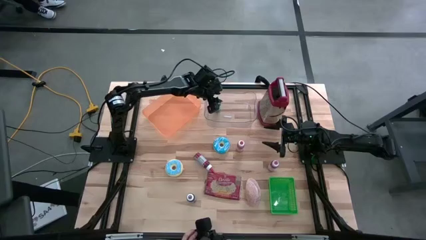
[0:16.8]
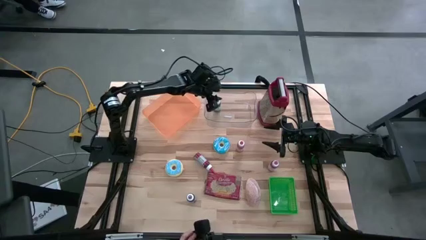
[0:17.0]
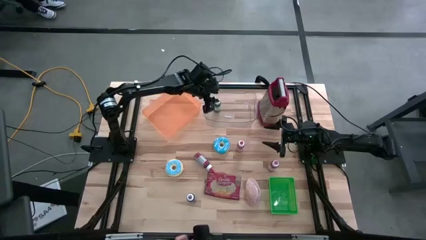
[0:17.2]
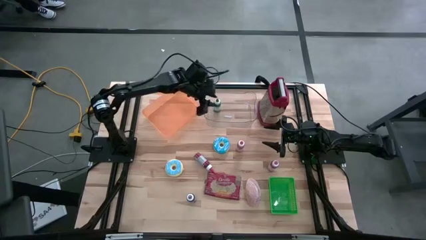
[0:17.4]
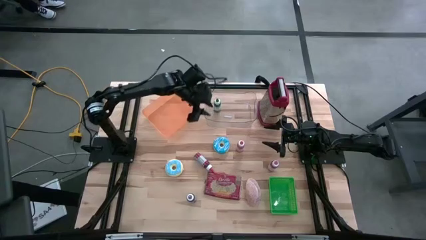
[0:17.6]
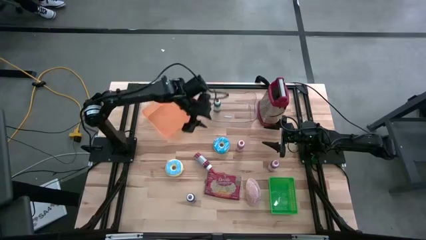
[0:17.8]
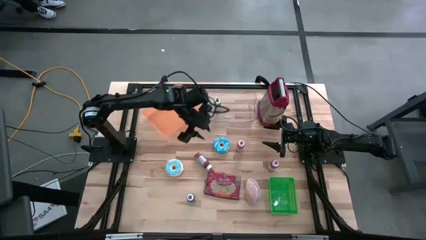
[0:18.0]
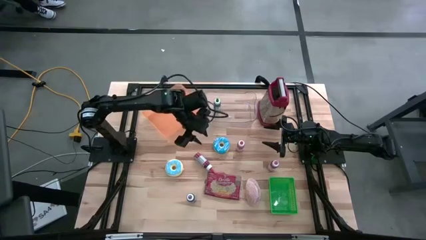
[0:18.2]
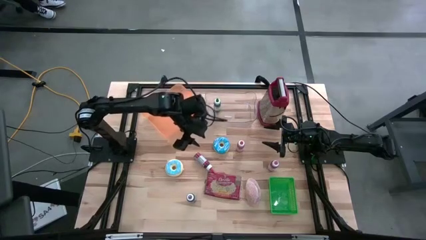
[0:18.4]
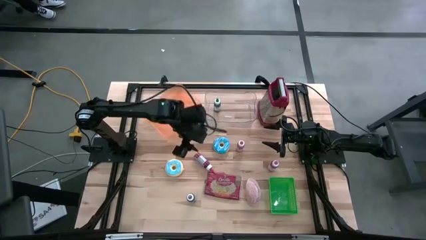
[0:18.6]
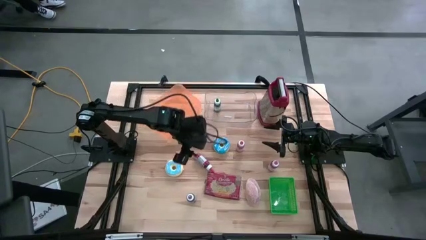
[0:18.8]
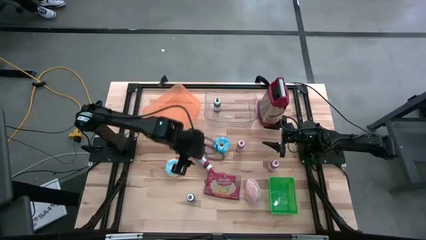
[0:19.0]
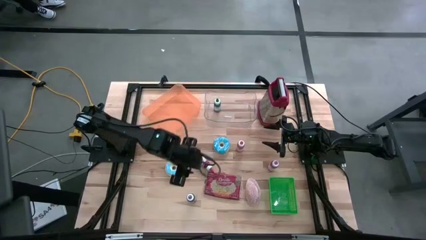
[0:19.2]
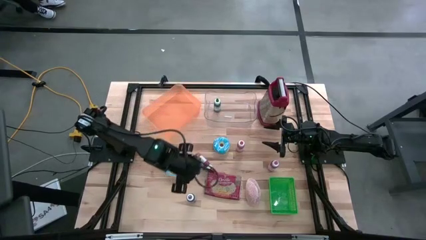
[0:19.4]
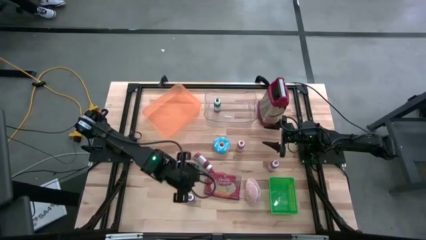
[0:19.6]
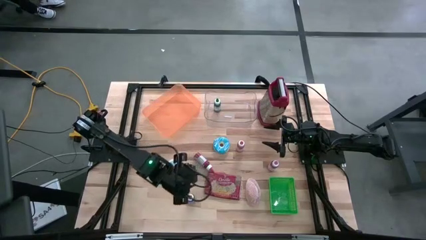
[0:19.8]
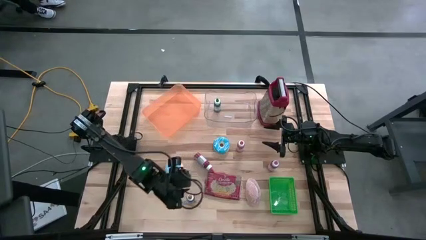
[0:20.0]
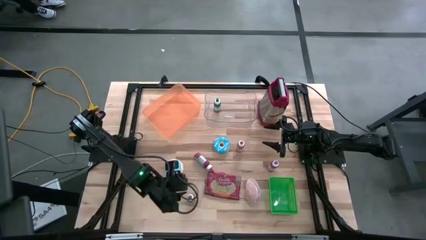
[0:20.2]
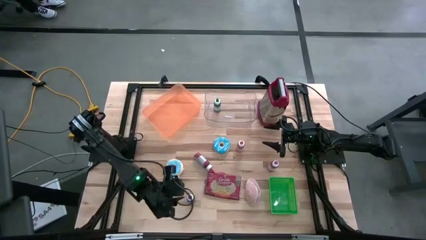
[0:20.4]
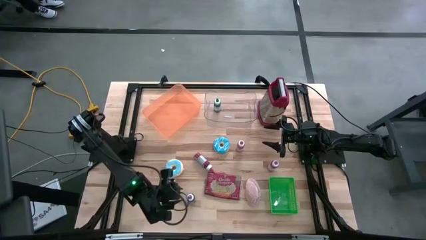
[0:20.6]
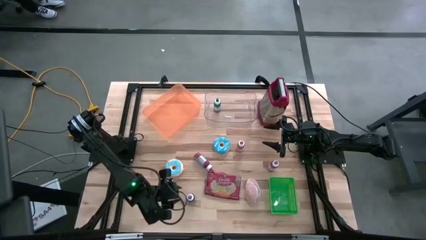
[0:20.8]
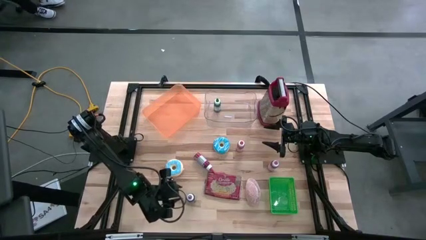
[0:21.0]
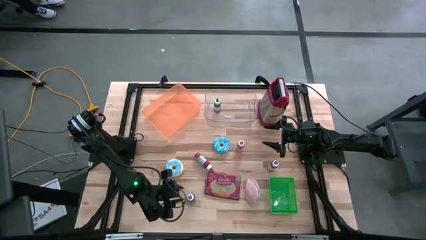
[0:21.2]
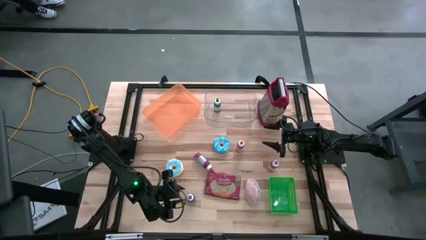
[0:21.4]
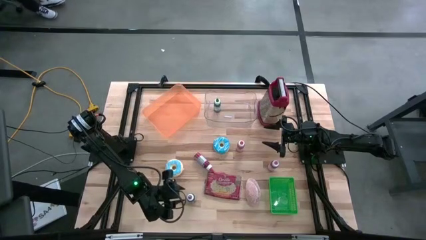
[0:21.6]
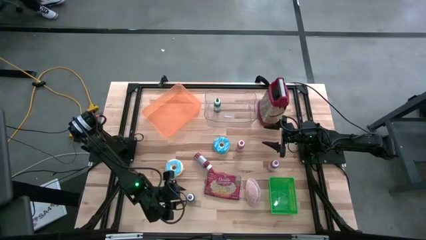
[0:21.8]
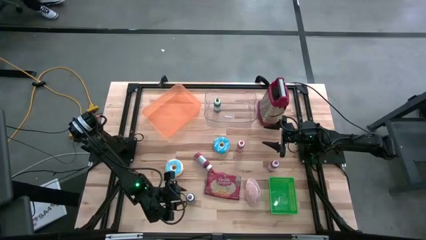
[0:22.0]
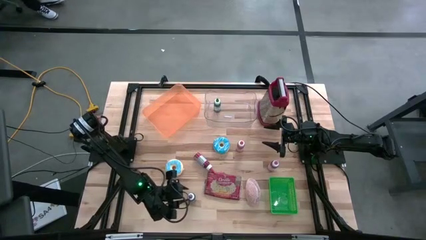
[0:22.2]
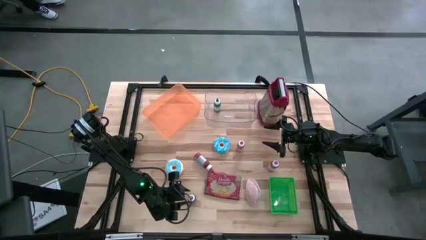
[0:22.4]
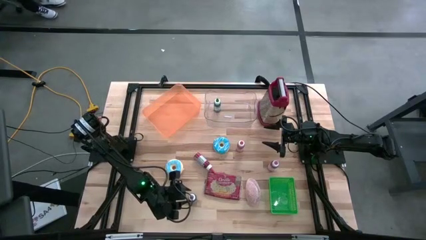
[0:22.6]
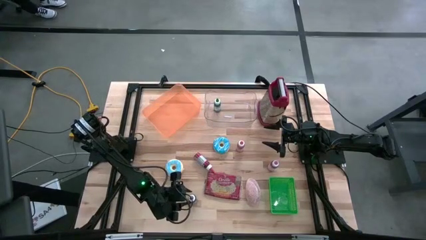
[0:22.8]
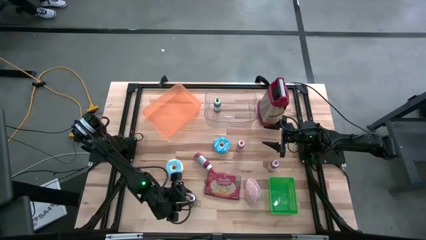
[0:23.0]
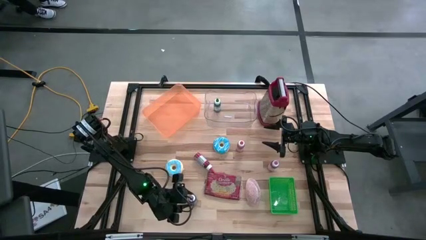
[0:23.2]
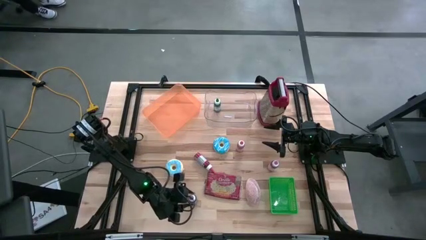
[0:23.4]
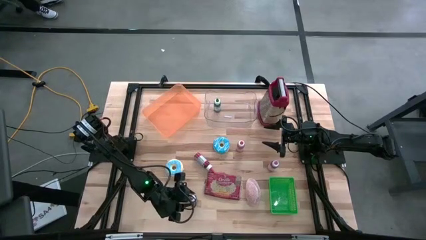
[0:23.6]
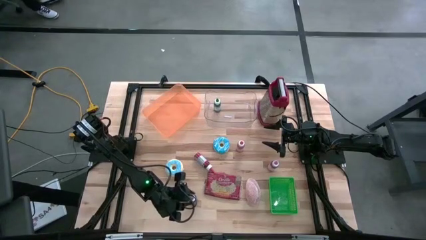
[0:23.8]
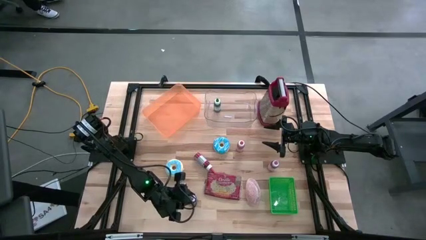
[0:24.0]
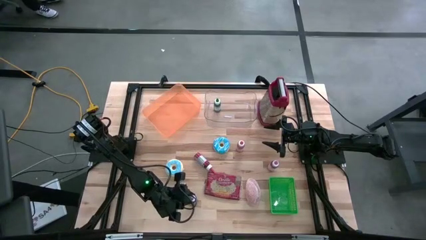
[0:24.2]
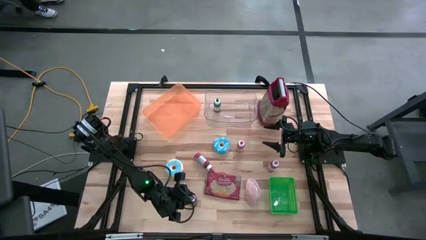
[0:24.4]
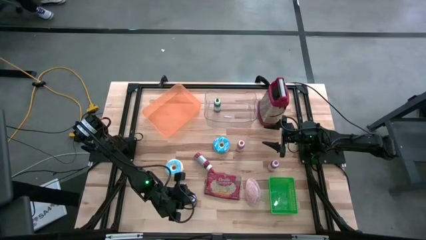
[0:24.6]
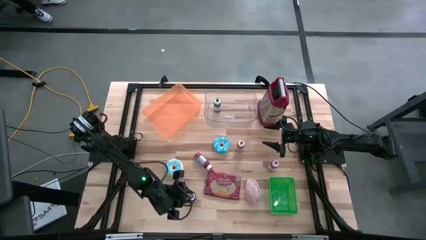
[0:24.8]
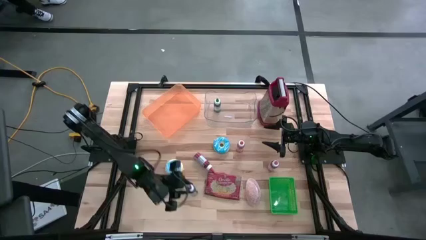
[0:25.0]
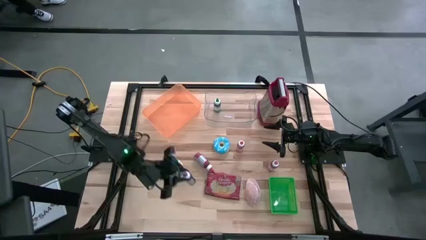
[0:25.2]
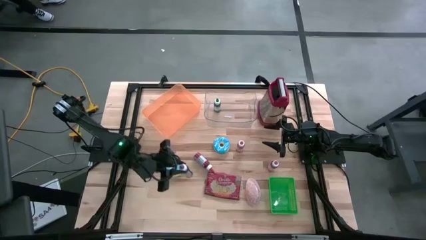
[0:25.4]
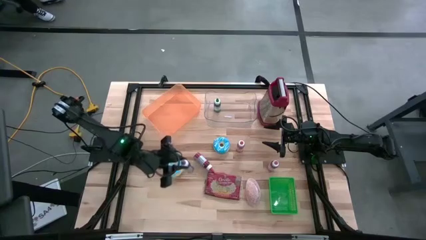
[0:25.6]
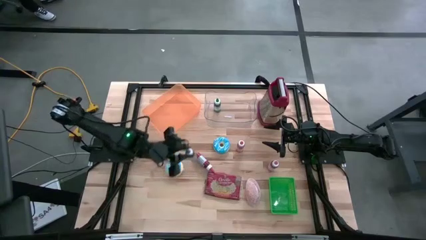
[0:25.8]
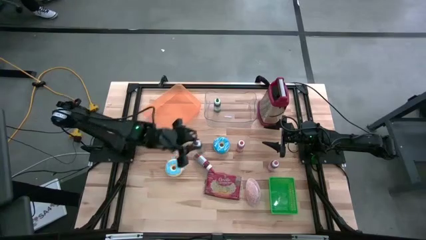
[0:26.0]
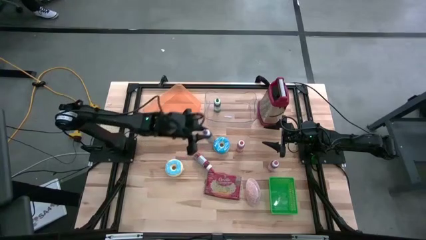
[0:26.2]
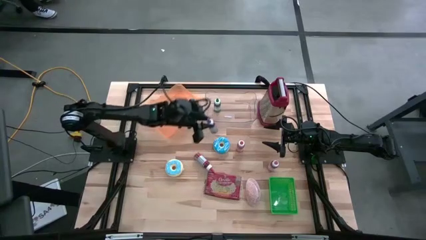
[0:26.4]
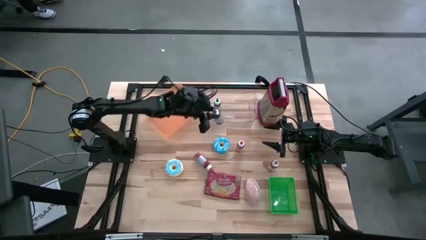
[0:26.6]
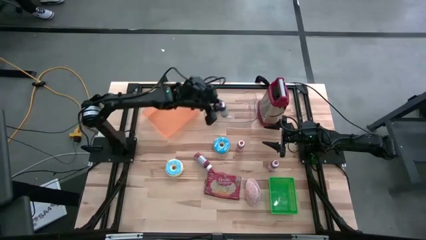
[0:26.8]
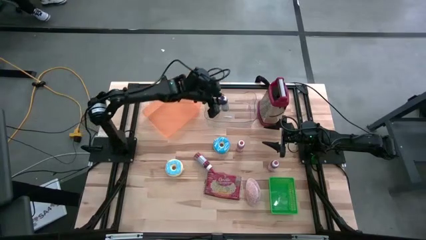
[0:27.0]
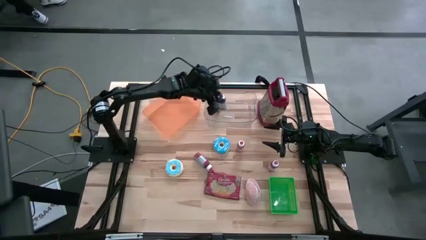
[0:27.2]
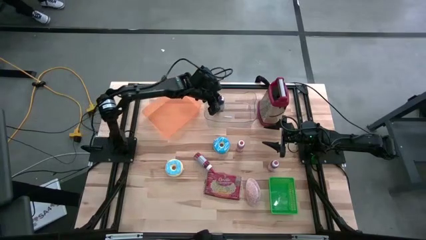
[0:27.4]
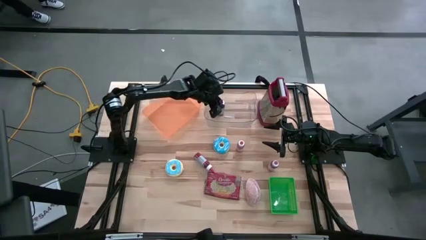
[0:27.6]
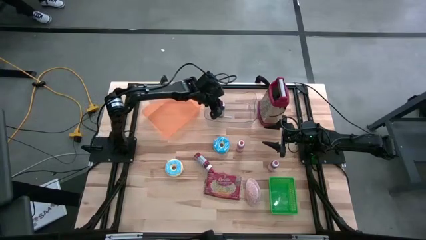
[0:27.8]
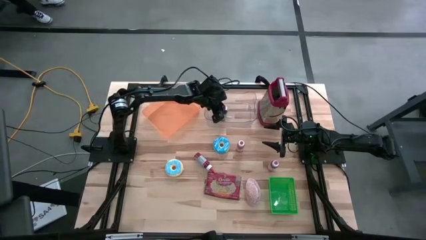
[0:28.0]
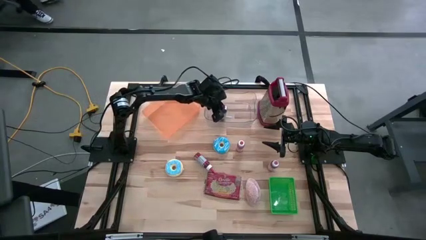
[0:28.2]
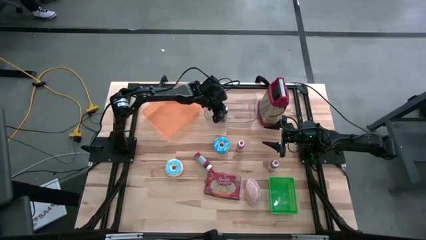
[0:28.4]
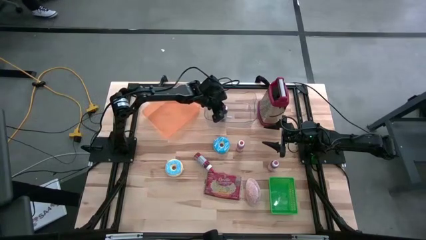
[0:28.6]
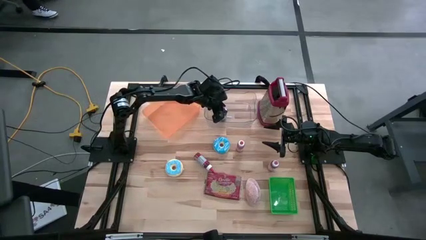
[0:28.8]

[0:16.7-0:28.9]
Put the violet food coloring bottle into the transparent bin
